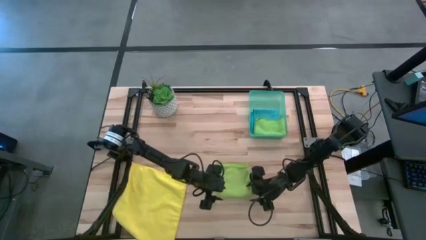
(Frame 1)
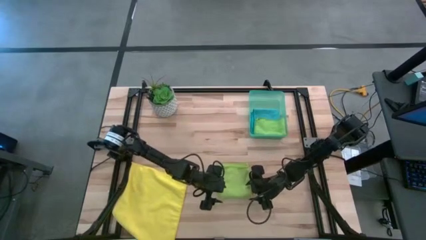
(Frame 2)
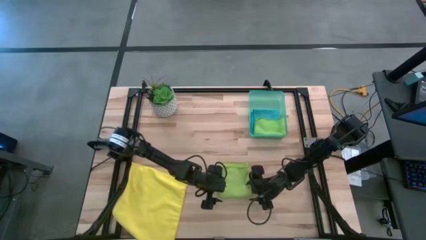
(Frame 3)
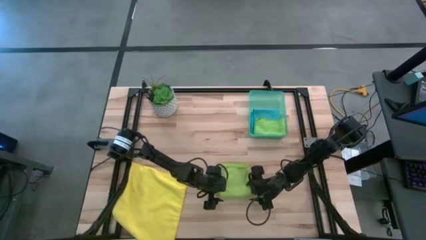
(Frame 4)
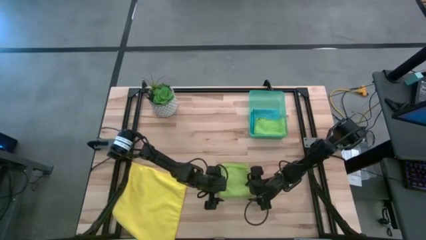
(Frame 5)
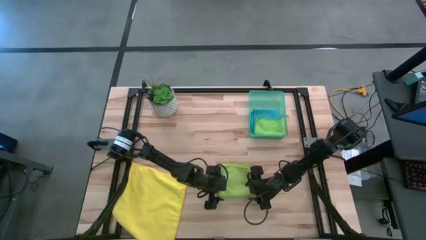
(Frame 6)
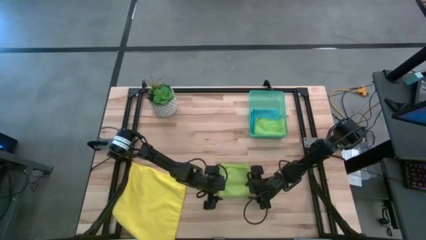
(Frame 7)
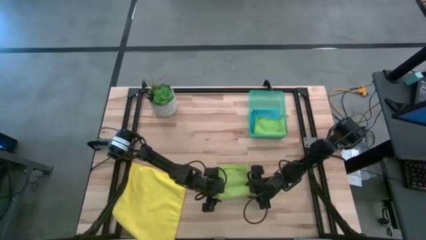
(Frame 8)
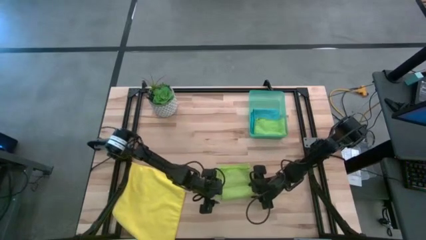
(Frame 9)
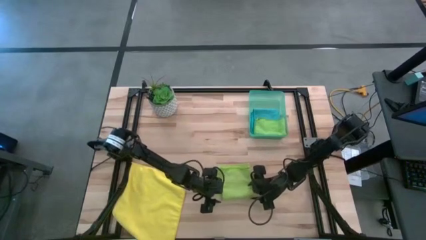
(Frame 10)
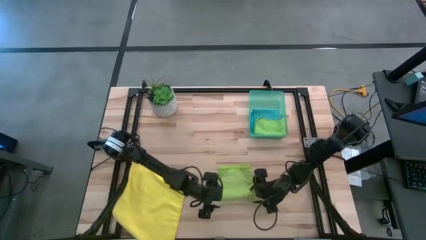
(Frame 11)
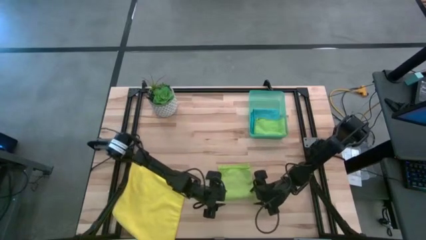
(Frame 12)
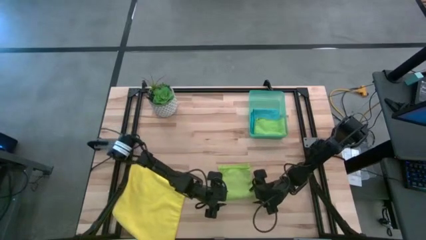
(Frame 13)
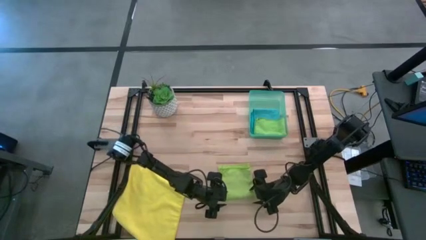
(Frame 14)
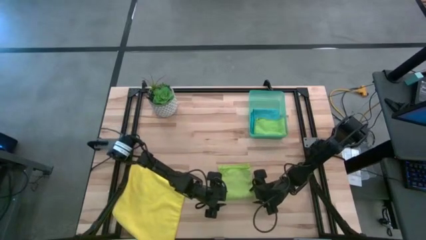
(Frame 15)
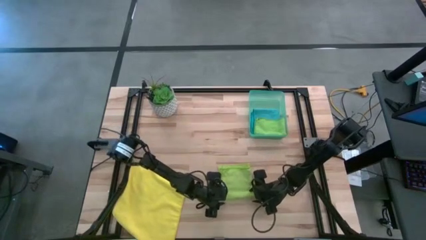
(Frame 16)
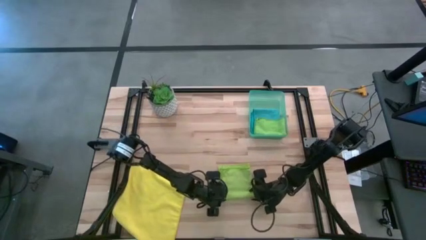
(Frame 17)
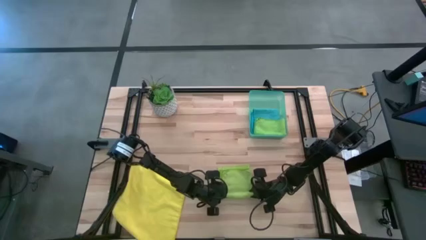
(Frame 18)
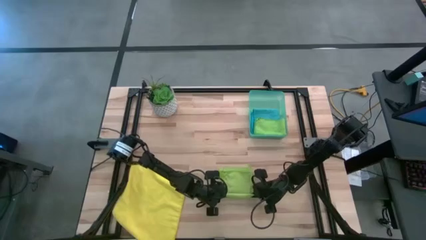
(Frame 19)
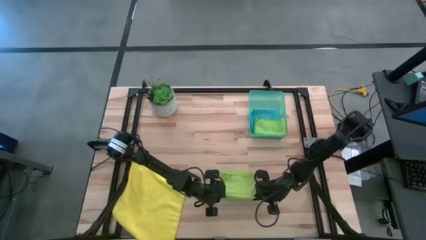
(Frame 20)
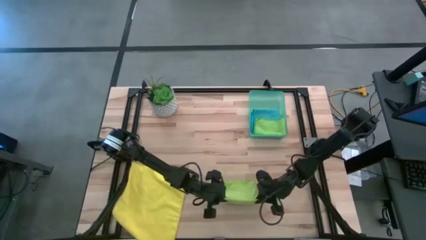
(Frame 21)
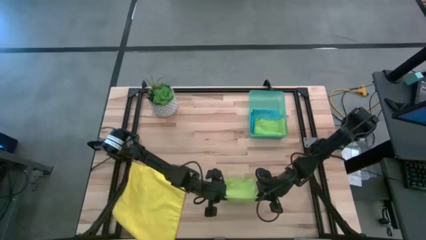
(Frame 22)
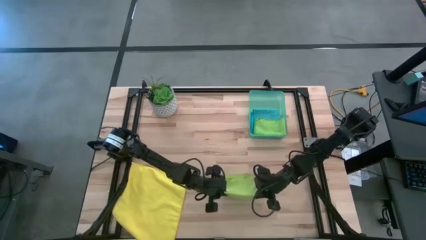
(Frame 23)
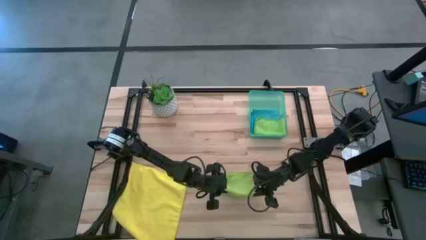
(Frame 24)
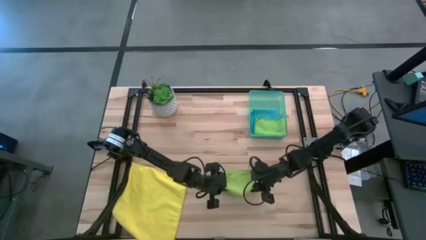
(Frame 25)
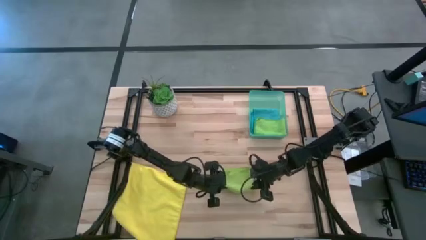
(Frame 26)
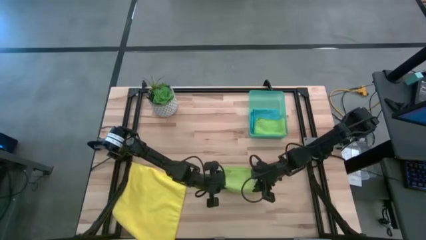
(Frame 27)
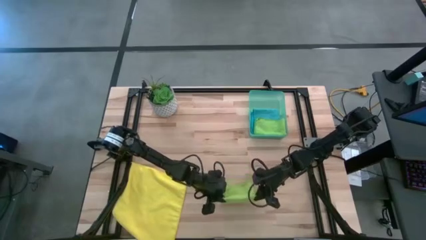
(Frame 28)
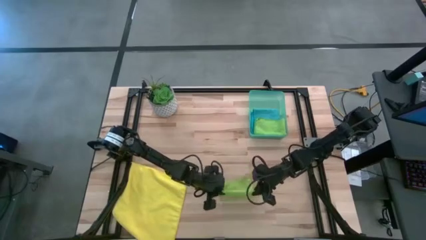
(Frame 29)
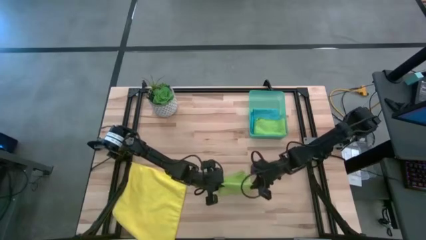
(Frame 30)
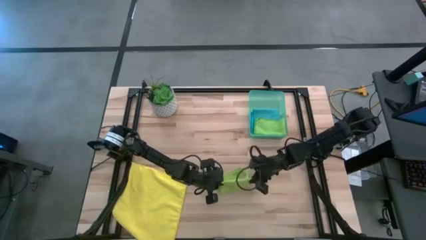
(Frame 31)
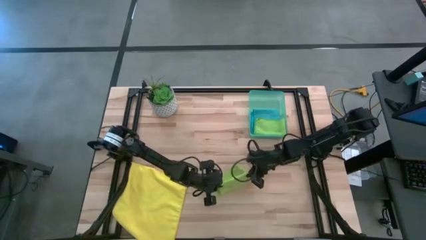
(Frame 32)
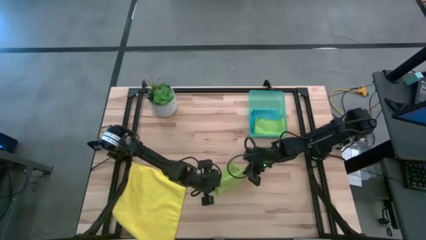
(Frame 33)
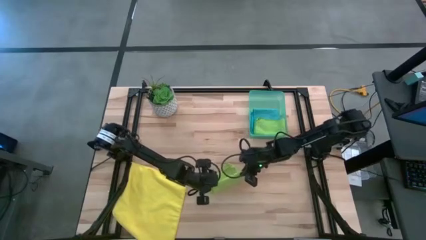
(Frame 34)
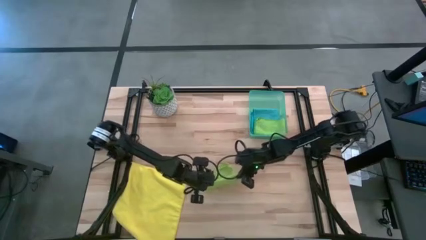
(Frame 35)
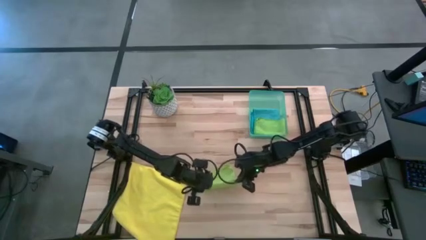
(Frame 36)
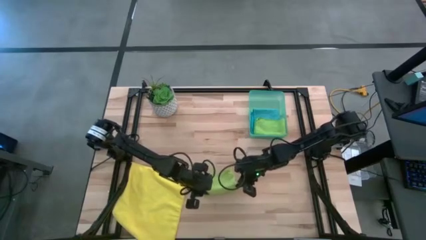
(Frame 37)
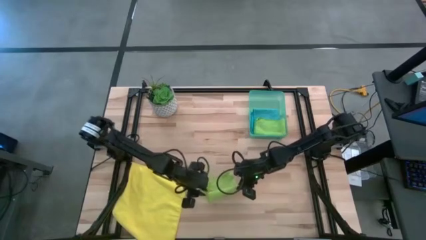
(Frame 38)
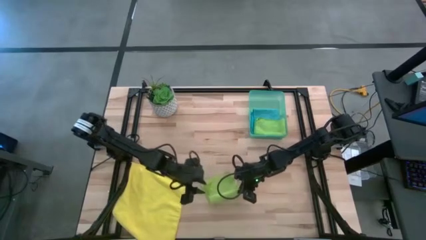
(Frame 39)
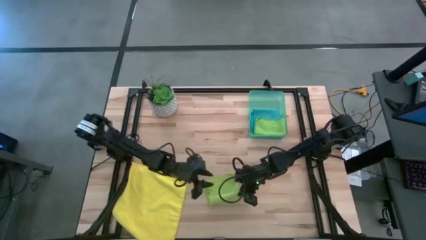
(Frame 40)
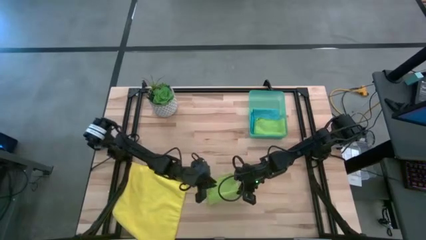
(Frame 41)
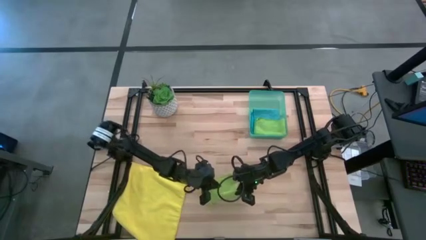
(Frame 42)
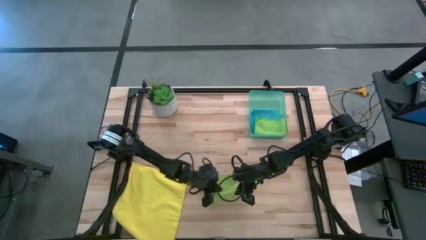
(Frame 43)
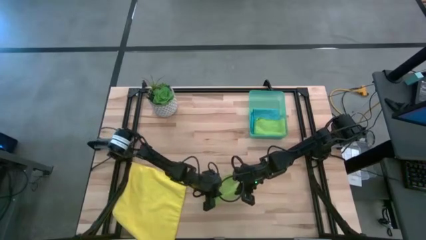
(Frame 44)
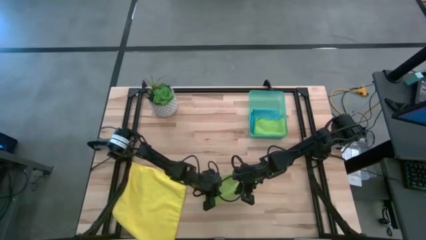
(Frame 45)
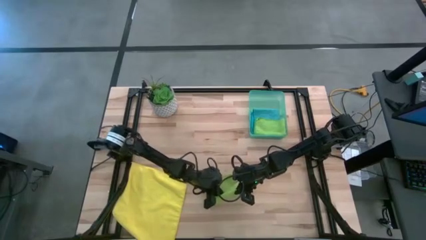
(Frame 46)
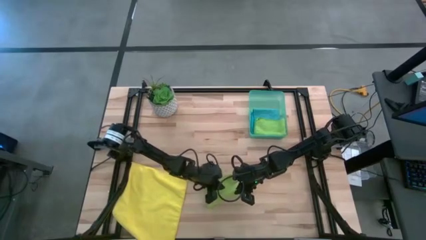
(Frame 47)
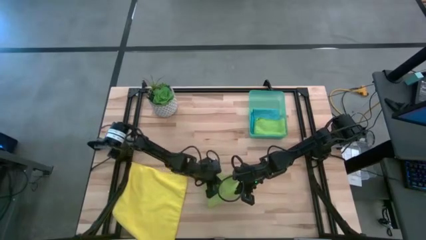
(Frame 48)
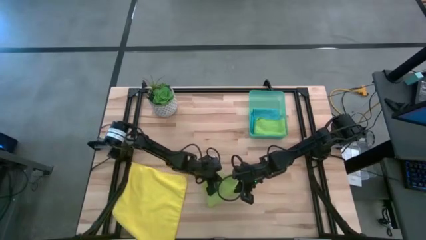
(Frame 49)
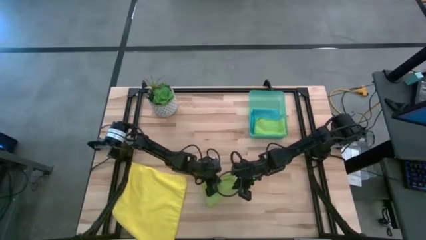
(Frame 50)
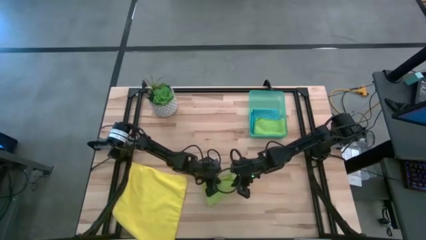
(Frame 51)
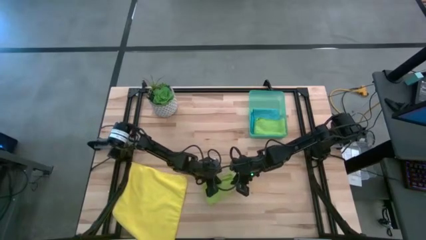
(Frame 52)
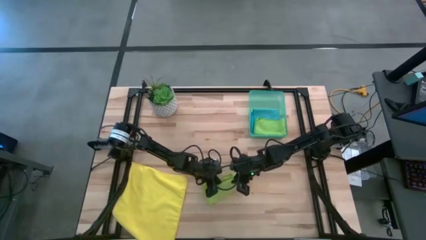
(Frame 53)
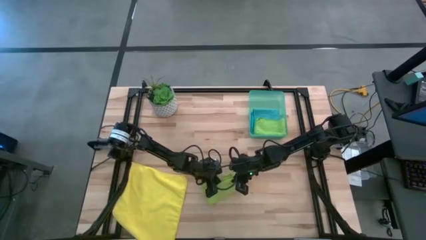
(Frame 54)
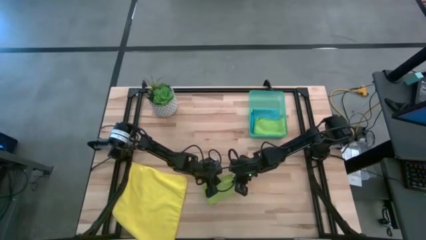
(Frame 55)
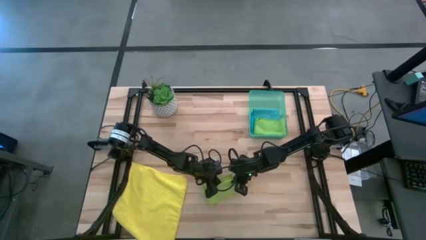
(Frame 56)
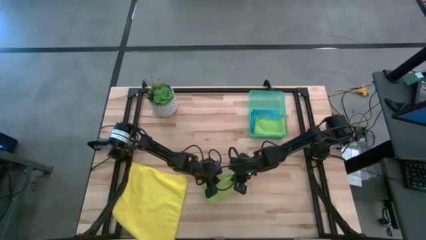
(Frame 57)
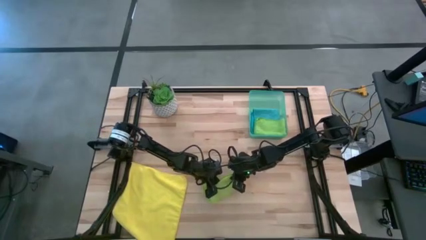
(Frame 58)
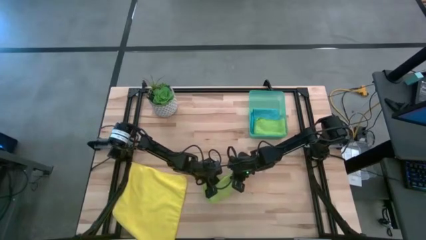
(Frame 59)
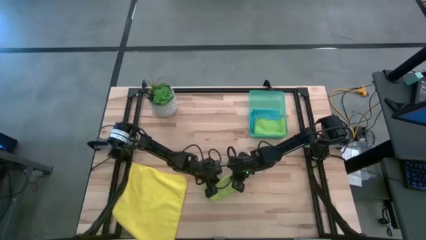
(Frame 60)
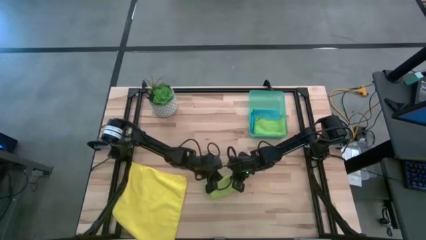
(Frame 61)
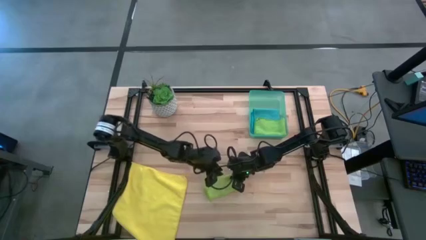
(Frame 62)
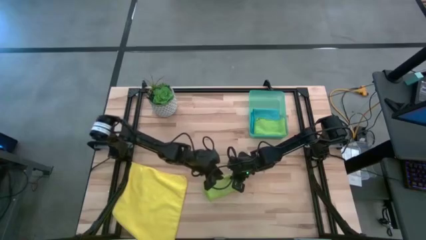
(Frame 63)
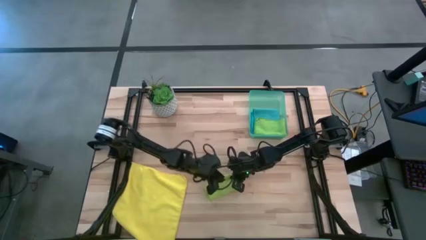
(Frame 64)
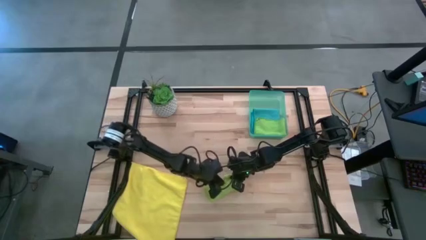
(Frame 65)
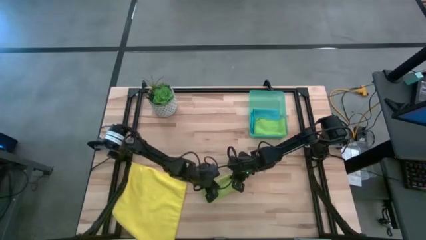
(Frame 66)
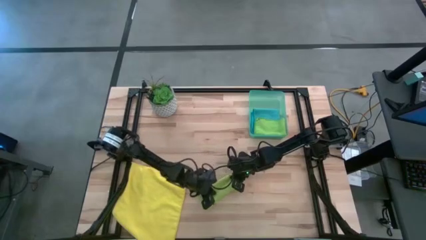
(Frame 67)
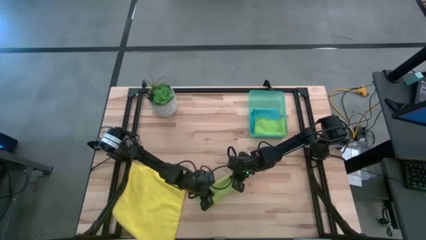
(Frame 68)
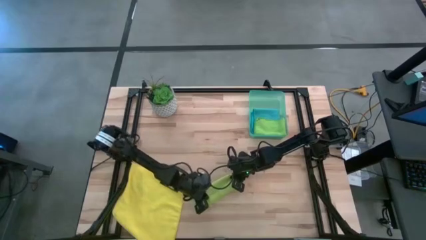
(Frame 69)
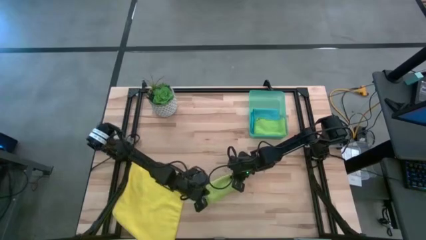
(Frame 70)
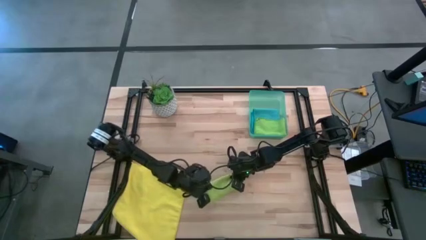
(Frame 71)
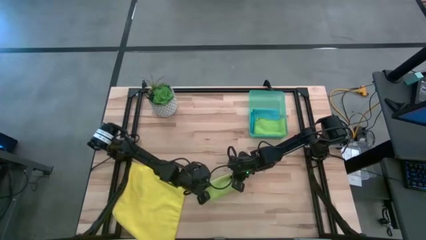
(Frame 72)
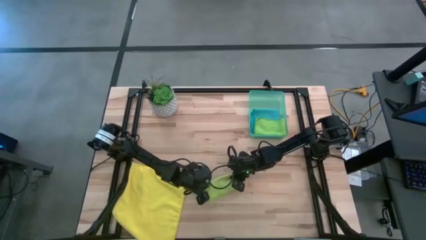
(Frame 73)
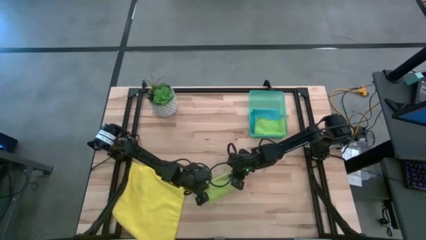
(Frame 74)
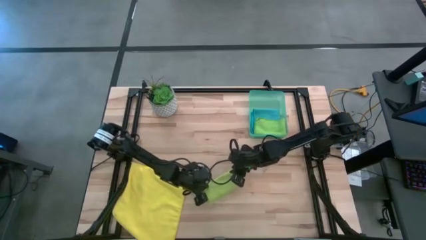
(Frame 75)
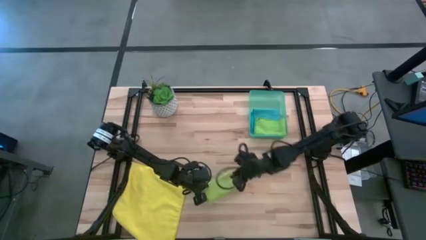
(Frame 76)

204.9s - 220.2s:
Task: Fold microfiber towels
Fold the light green towel
